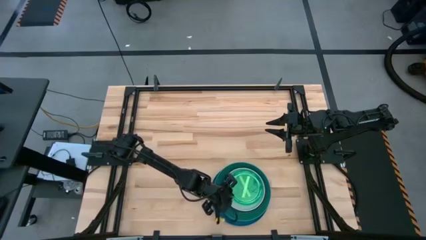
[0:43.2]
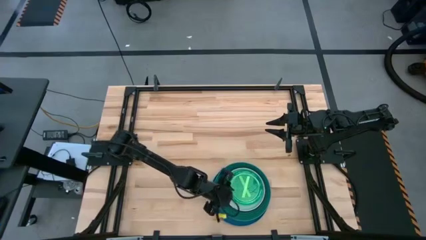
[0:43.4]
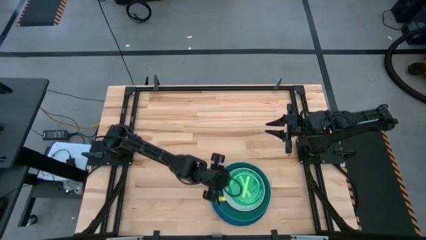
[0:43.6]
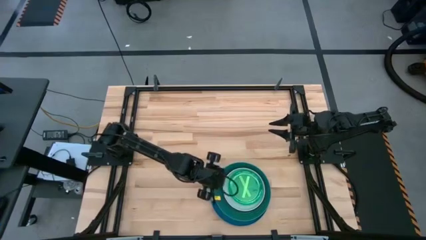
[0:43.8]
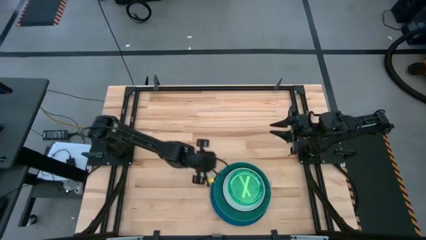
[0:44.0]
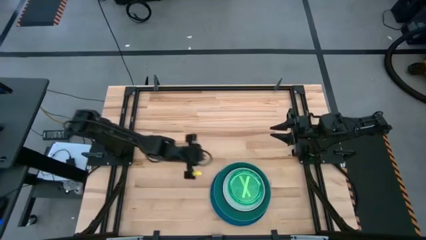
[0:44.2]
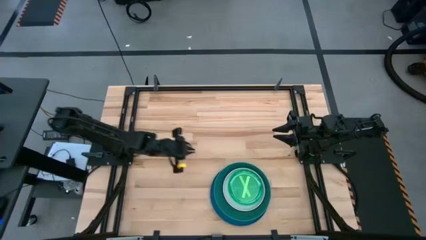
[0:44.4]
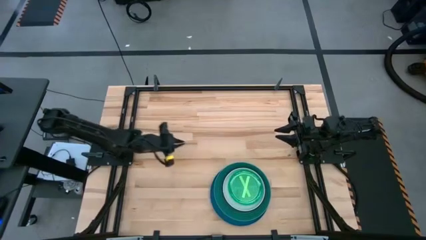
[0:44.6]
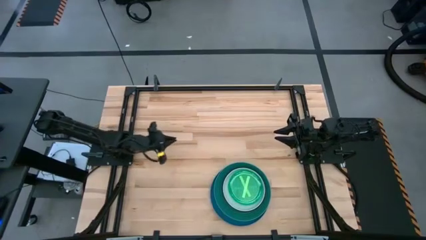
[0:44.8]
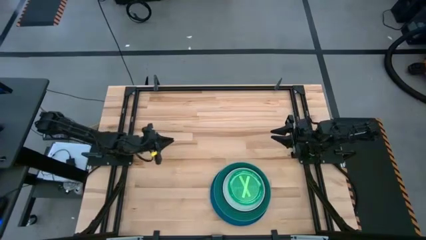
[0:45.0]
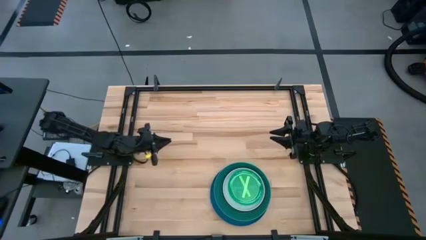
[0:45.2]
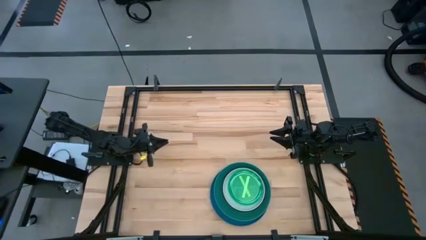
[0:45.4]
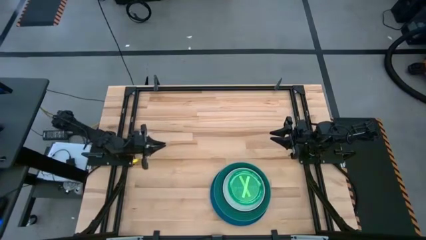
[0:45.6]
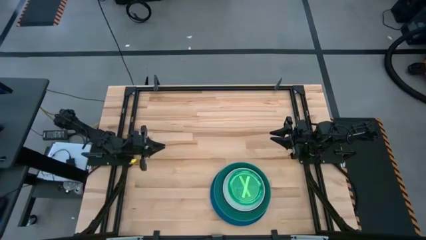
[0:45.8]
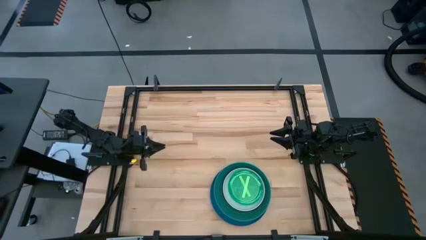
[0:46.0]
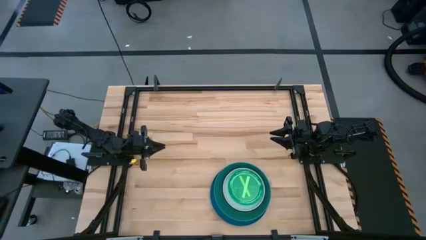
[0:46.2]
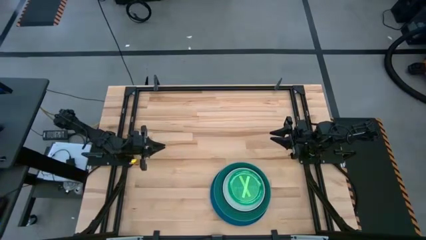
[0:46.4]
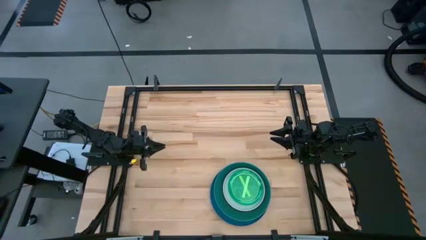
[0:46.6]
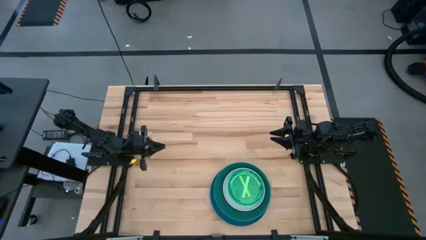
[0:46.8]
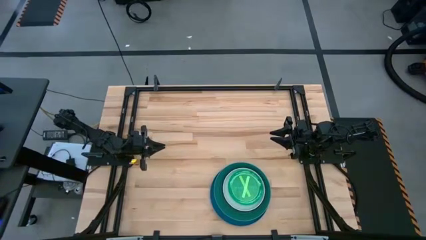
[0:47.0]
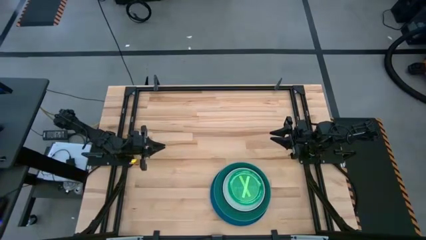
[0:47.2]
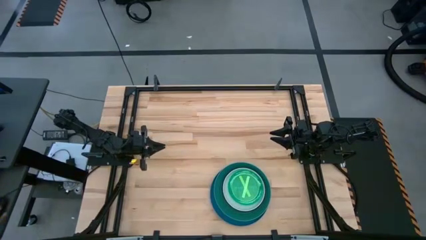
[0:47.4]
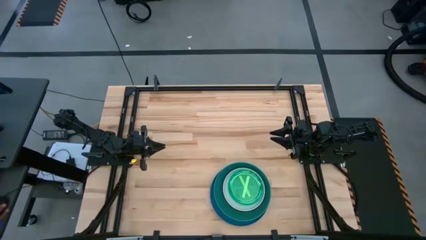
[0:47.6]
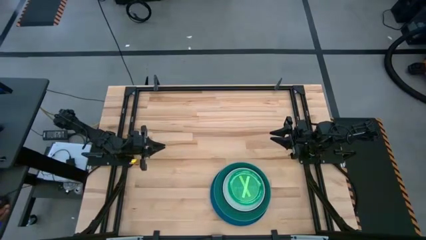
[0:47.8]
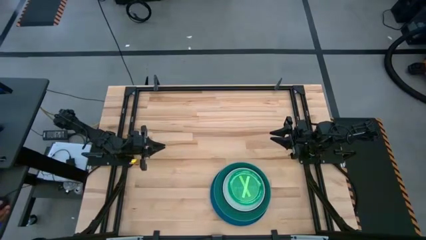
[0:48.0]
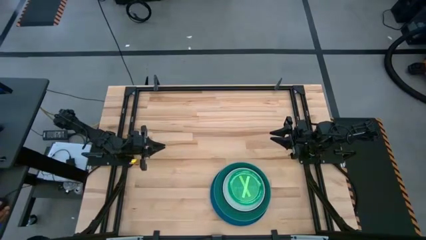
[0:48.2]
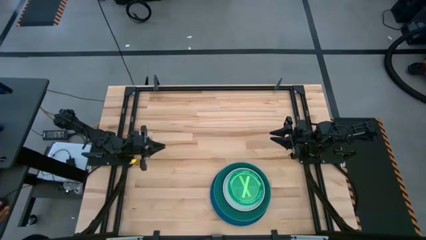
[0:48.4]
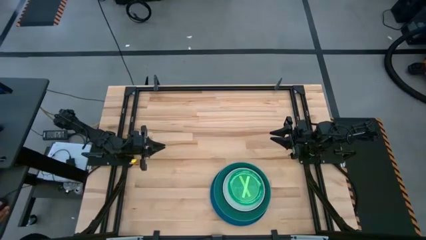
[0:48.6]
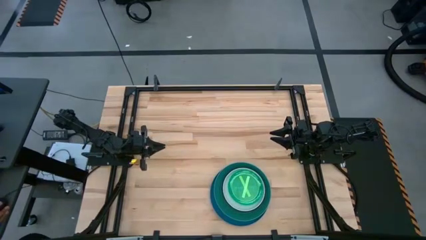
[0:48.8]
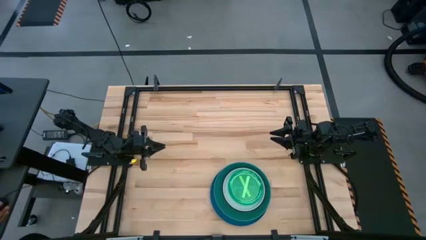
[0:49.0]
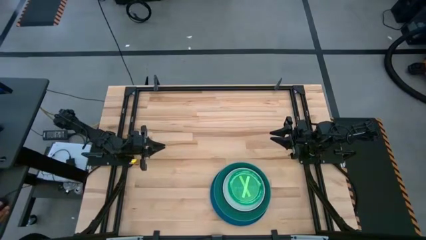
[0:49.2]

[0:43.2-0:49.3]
Task: Stack plastic plates
Return to Home Position

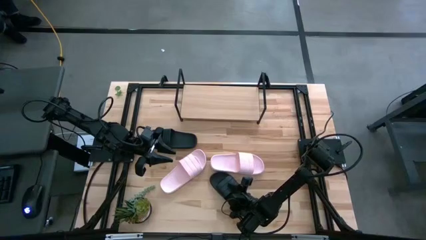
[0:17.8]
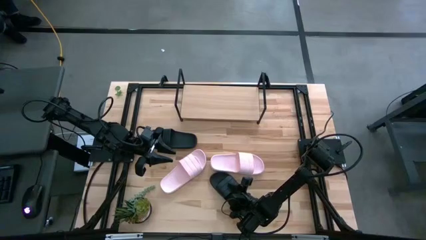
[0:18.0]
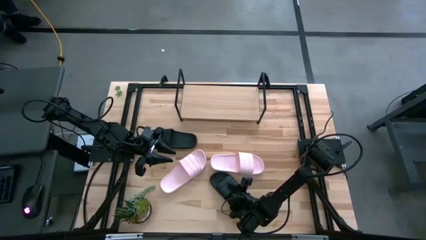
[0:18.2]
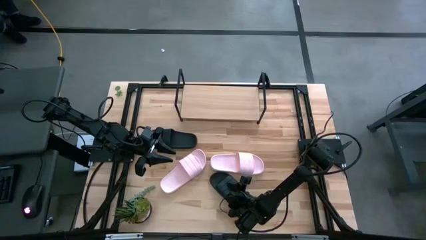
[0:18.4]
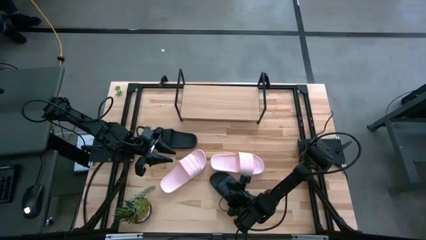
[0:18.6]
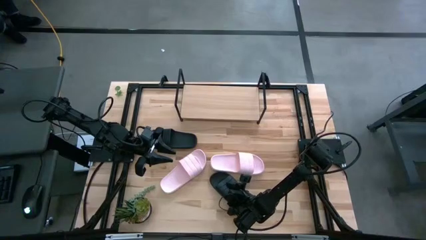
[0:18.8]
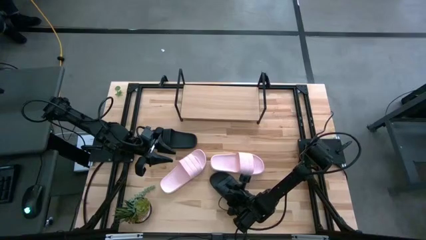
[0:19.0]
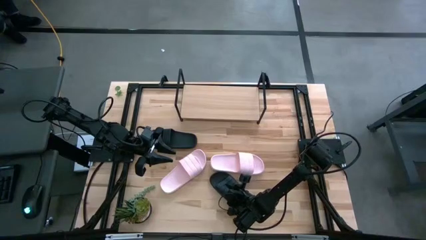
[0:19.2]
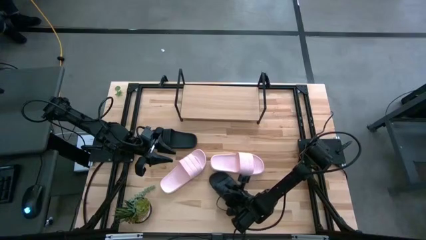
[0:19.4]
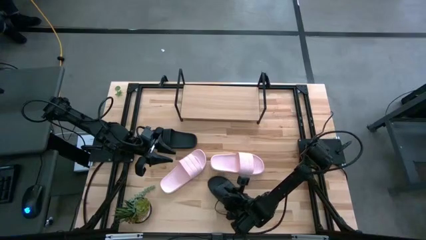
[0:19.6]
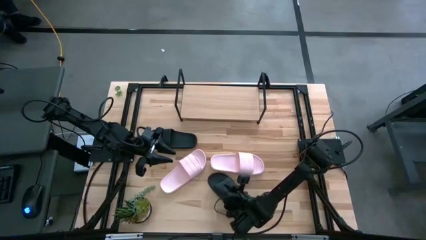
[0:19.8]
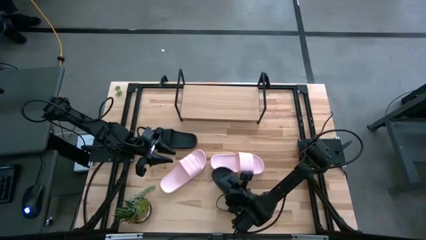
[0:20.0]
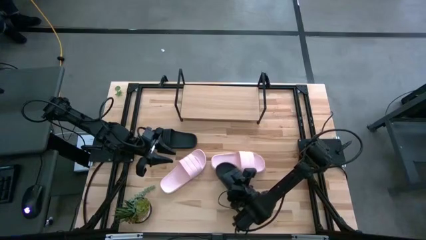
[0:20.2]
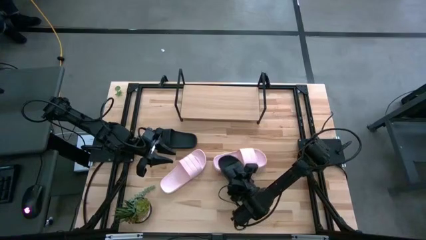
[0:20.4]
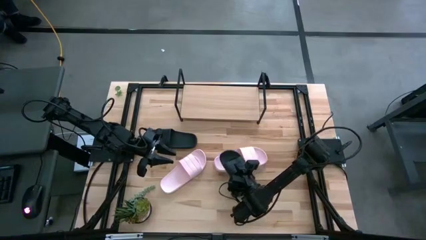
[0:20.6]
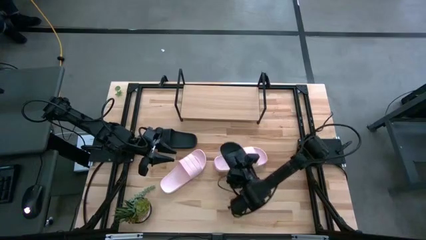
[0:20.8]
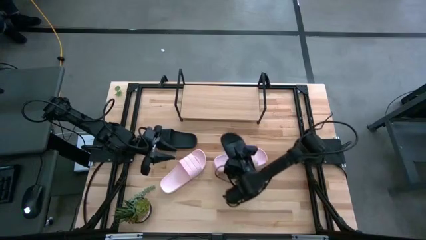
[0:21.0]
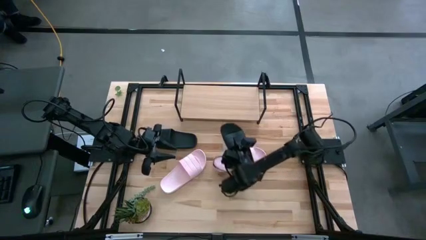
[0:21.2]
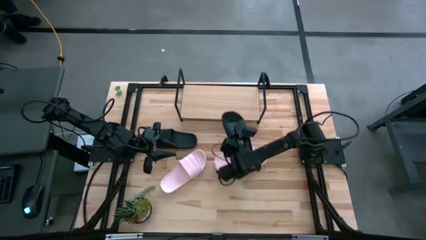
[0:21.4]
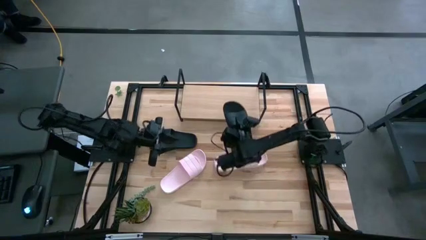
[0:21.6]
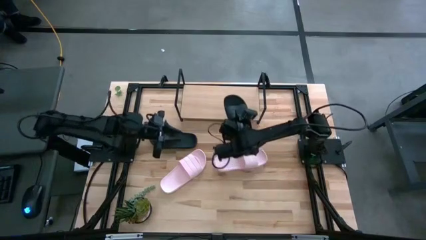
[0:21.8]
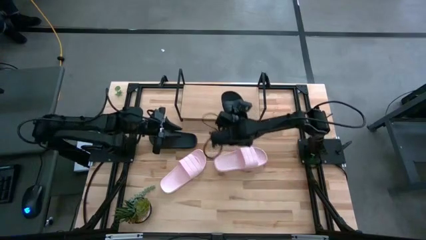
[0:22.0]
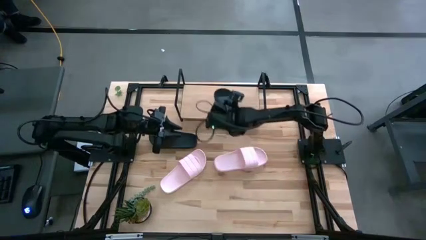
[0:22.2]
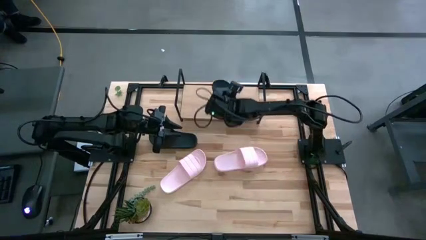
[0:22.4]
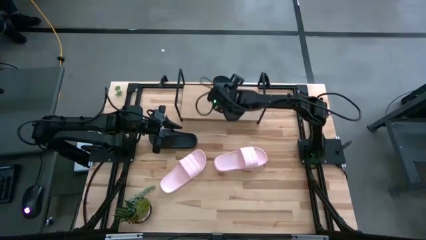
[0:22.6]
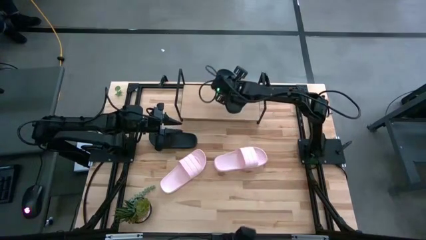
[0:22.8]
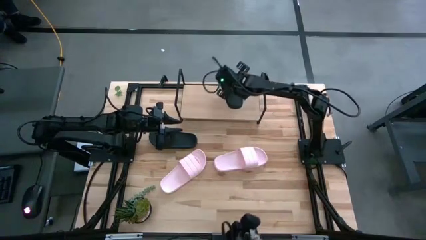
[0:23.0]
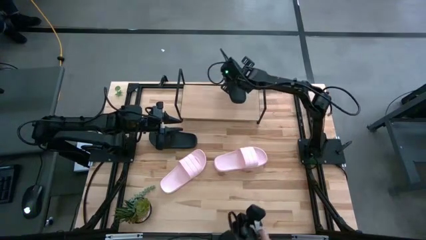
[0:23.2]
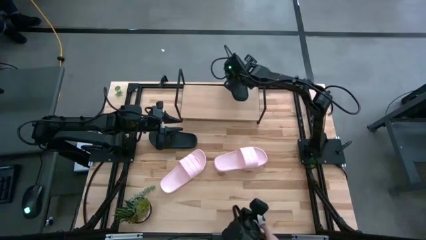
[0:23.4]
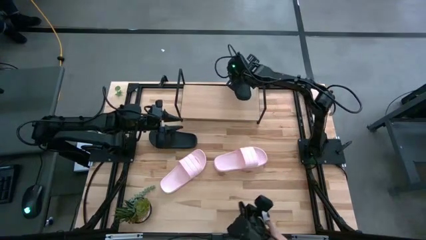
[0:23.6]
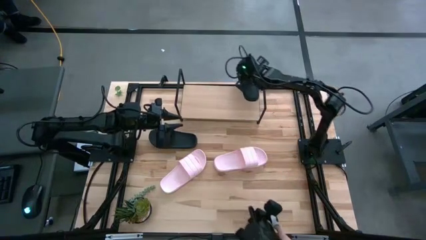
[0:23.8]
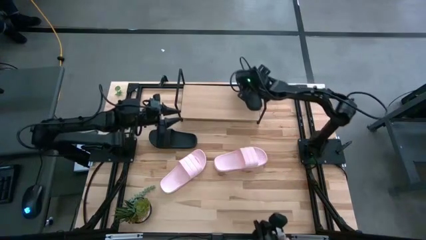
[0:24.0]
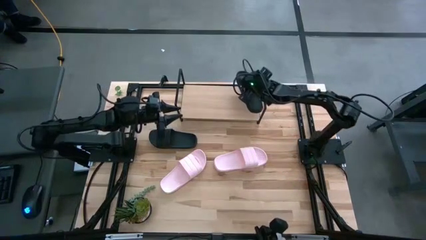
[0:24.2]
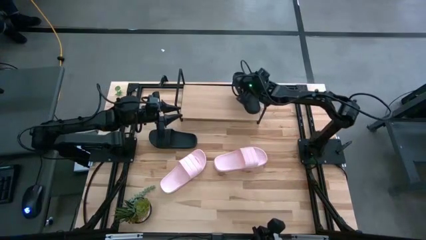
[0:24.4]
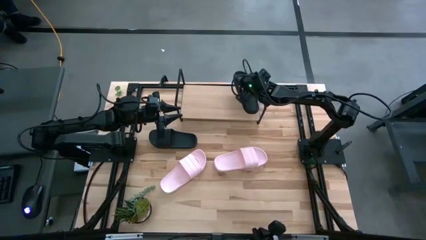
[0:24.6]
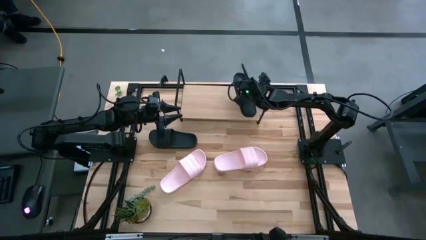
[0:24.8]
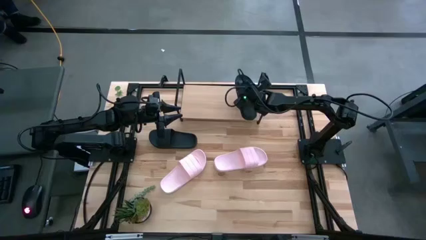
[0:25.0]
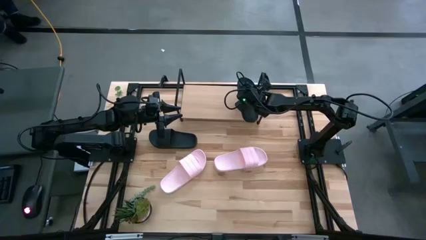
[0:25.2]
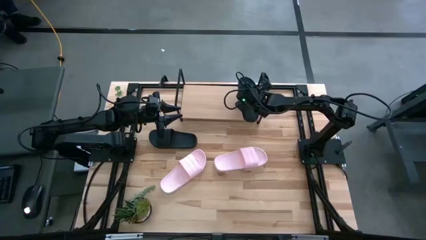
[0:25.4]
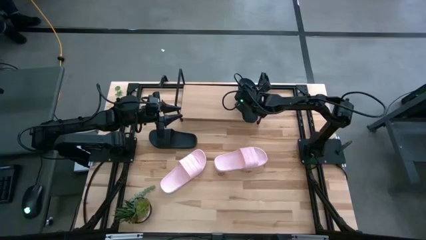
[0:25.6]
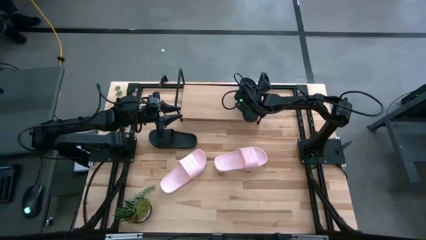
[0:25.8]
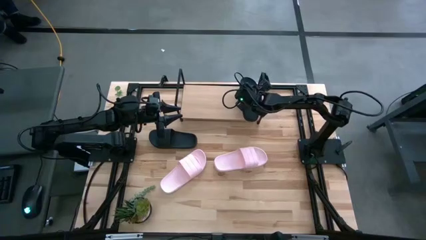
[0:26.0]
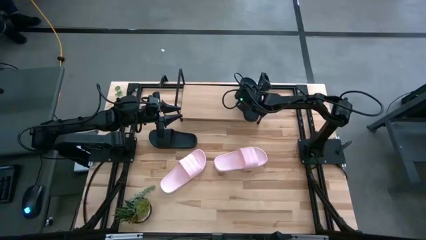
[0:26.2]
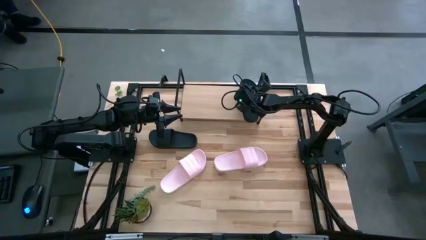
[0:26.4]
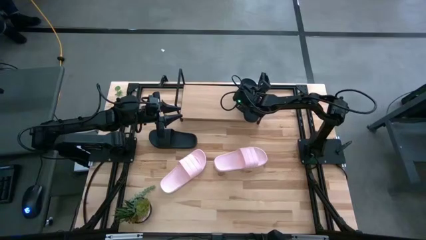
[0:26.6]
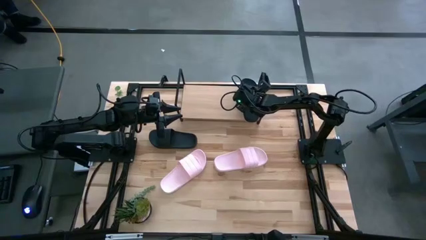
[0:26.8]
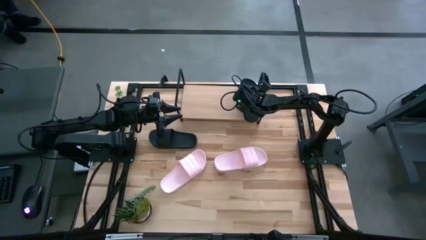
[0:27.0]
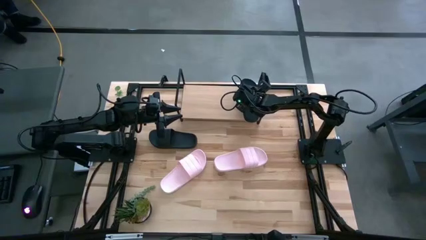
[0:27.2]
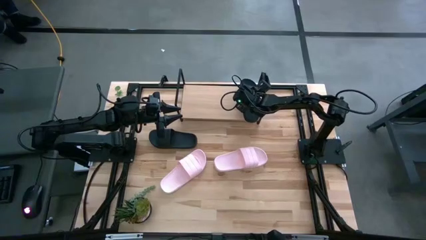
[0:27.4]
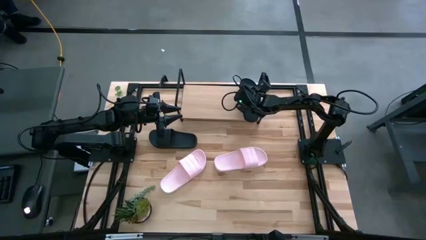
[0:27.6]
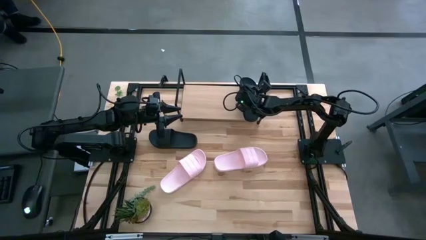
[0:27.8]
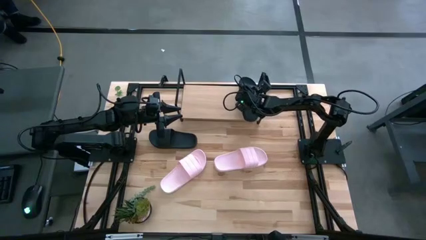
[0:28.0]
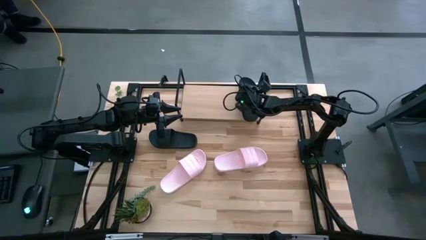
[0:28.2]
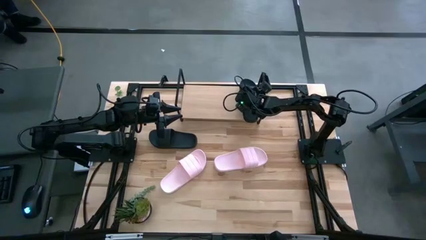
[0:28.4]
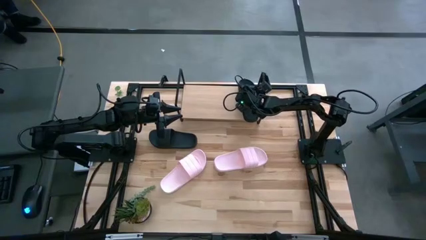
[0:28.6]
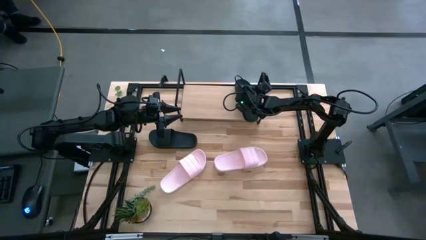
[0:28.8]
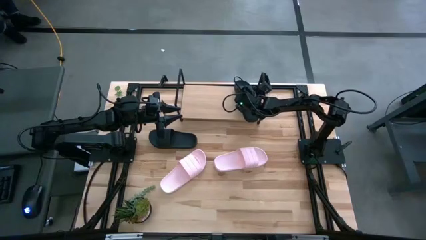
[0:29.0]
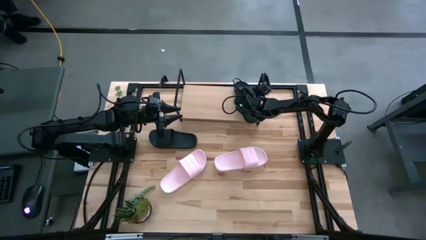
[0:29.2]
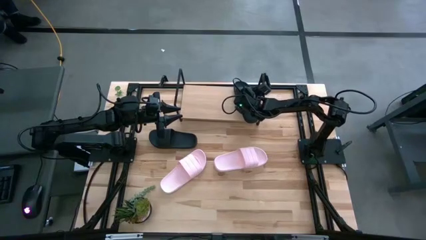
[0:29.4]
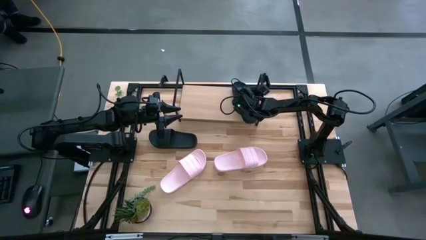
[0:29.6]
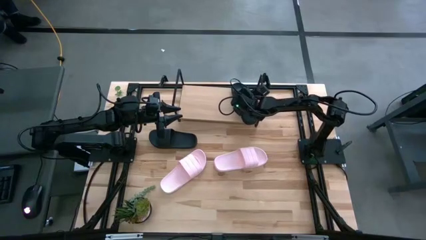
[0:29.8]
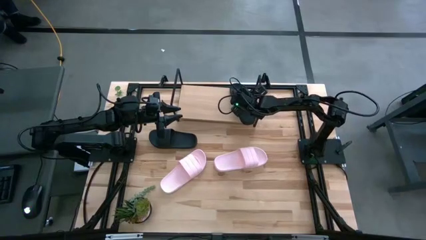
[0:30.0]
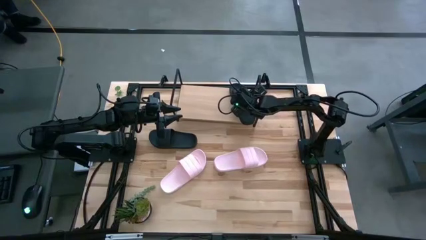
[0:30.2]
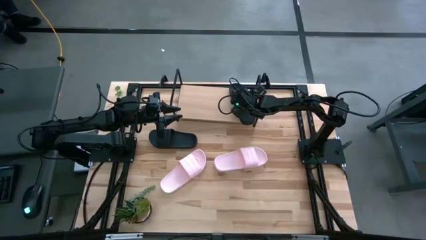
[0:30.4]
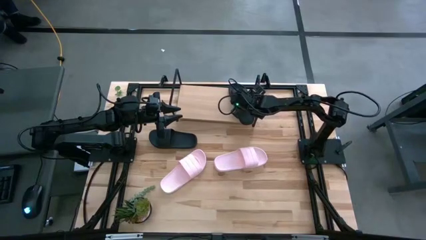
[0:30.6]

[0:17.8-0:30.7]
Task: Pick and place slides into the shelf
Put the bottom black slide on the shelf
